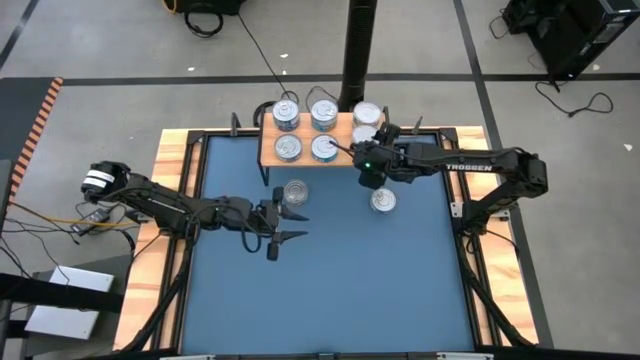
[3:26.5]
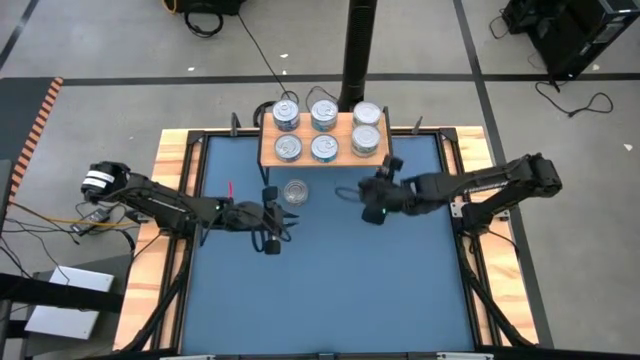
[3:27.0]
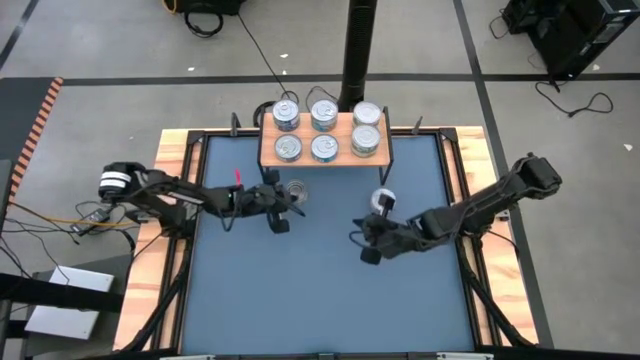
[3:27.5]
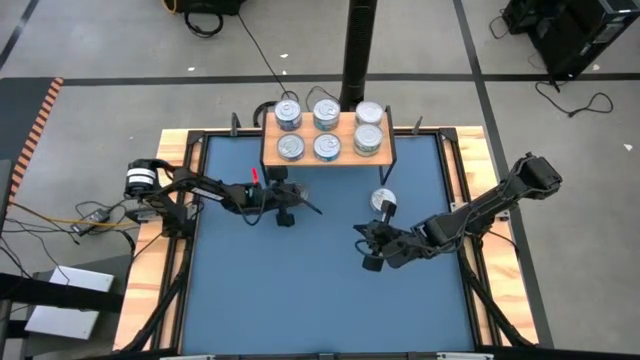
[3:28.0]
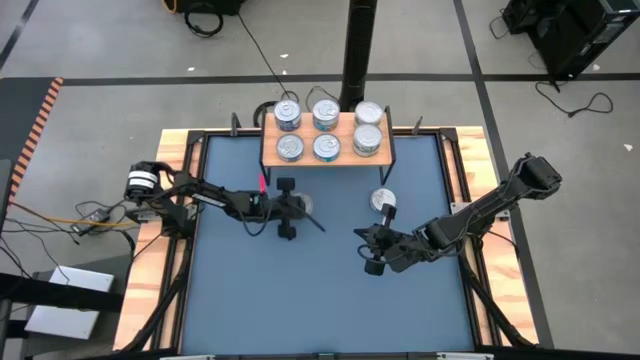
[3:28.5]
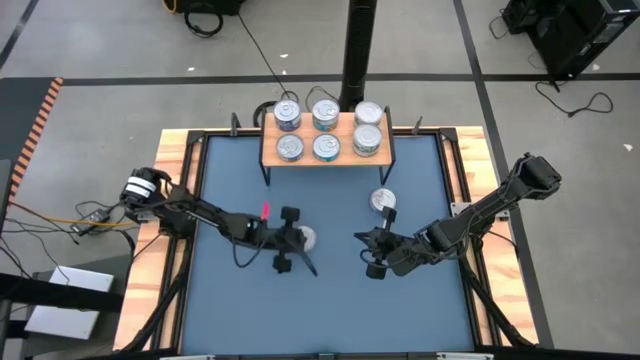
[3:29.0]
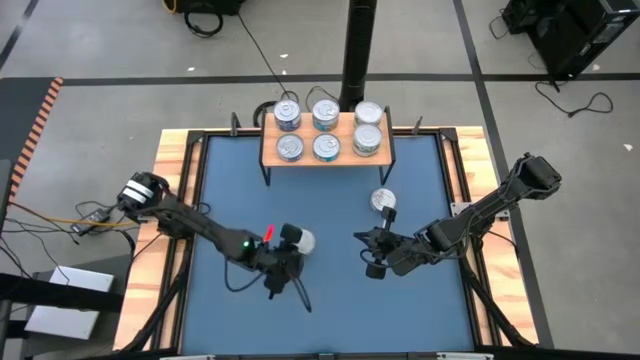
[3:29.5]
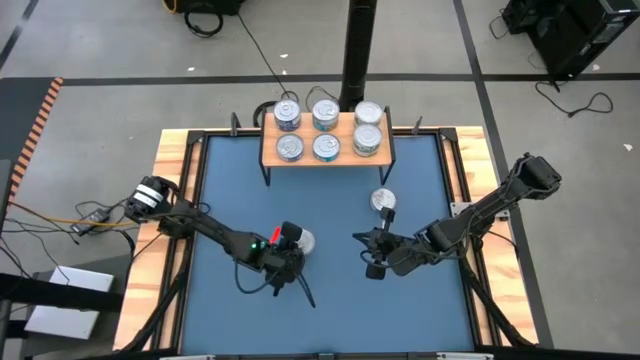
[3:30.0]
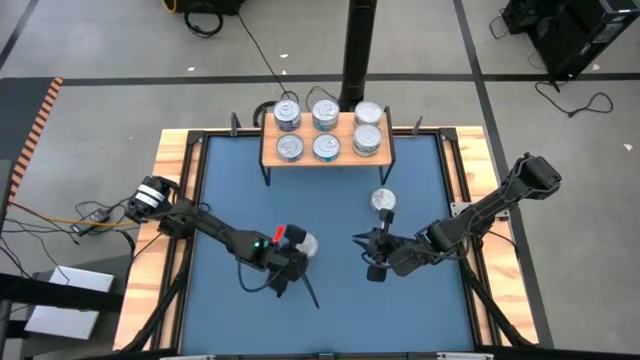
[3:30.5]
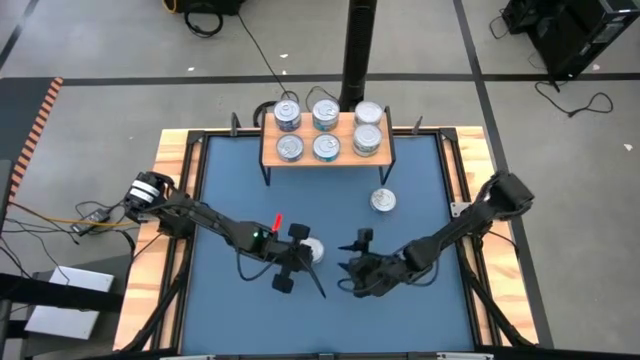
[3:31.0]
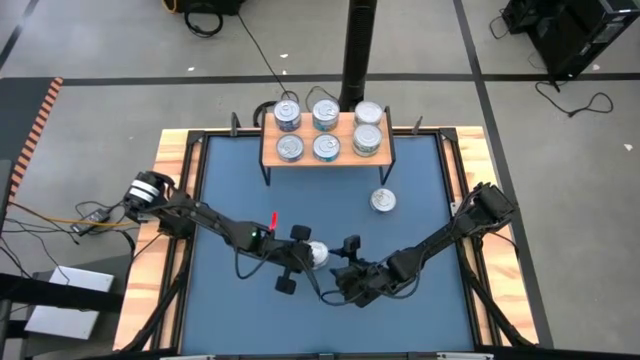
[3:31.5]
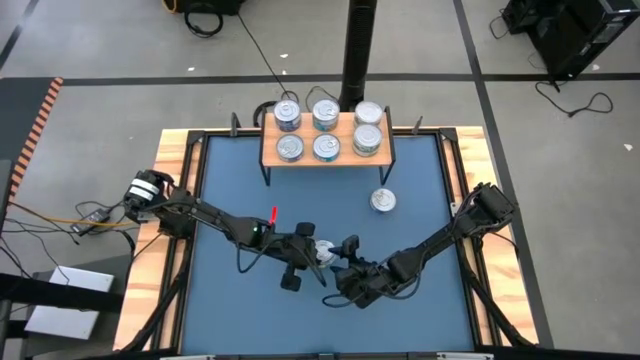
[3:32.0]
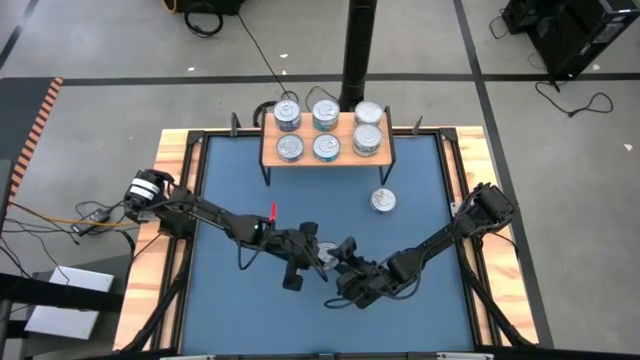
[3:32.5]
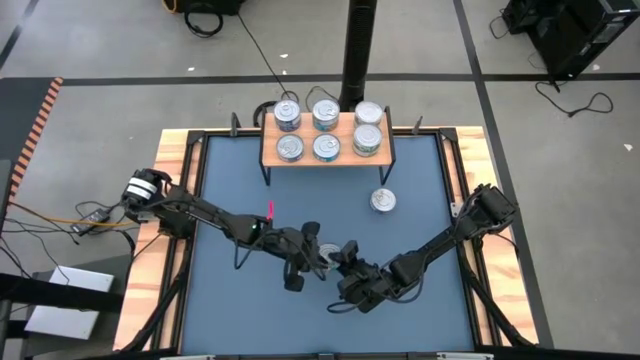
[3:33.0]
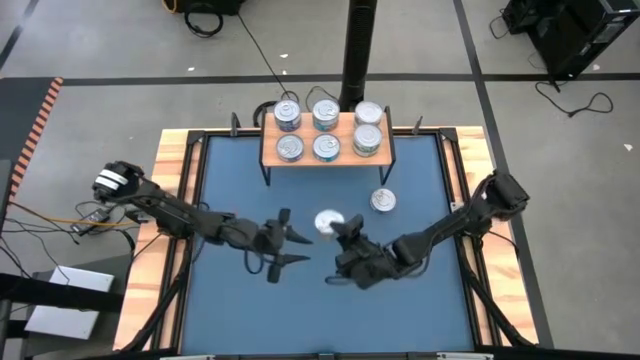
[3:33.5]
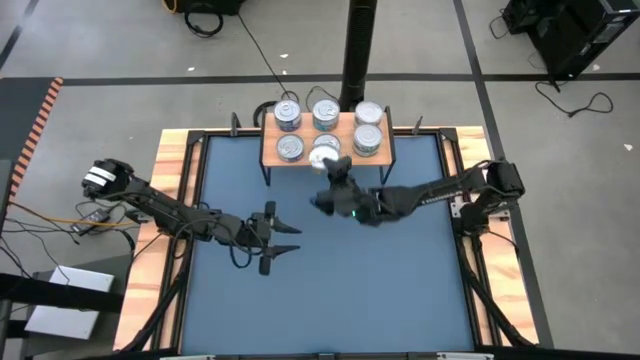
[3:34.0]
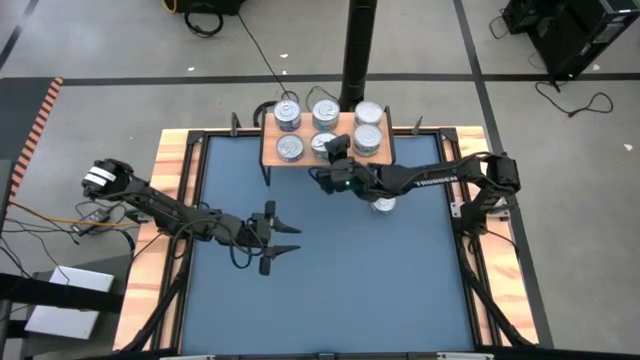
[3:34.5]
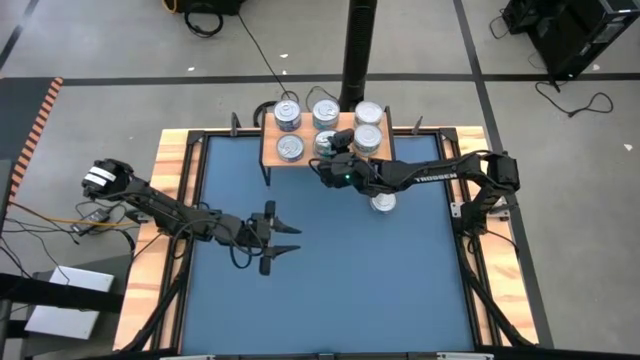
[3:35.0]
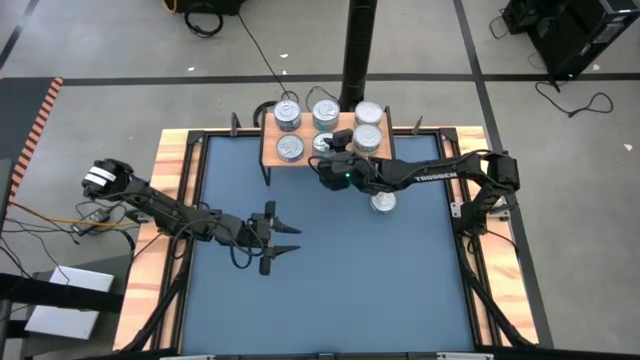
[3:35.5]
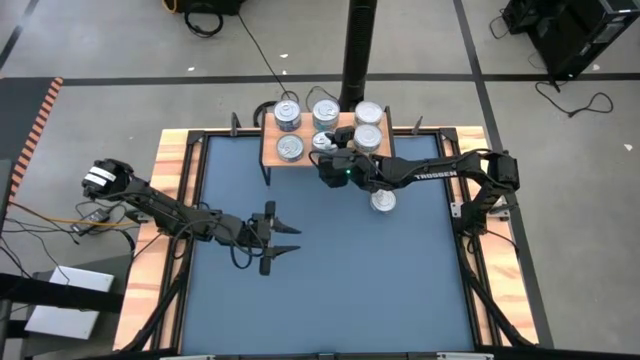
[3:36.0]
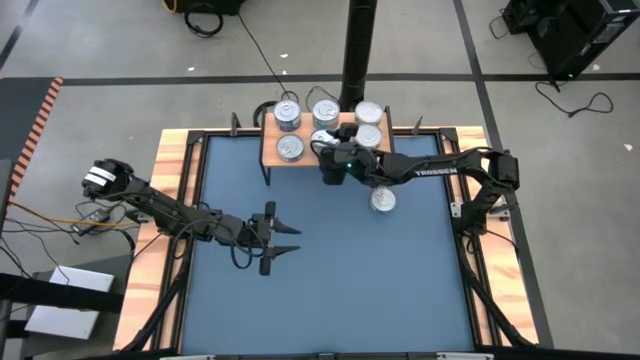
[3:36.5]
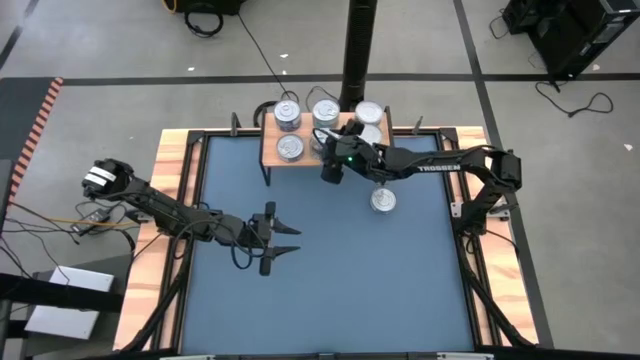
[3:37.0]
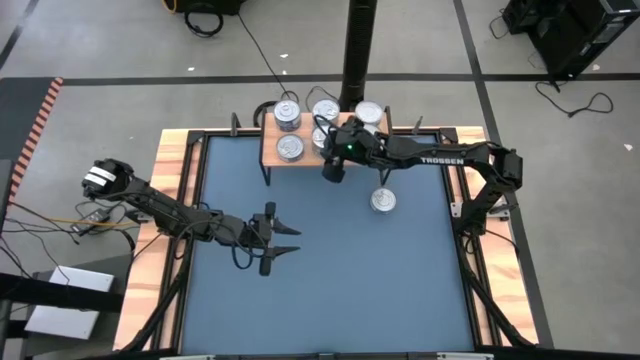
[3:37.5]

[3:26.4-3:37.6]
Task: Stack canned seafood by type on shelf
Stack the light blue tuna can on top of the light blue tuna can on the shelf

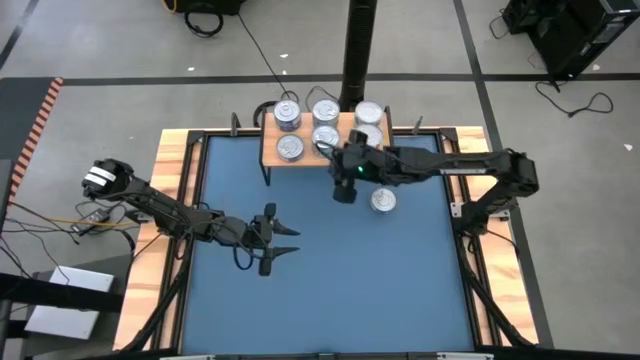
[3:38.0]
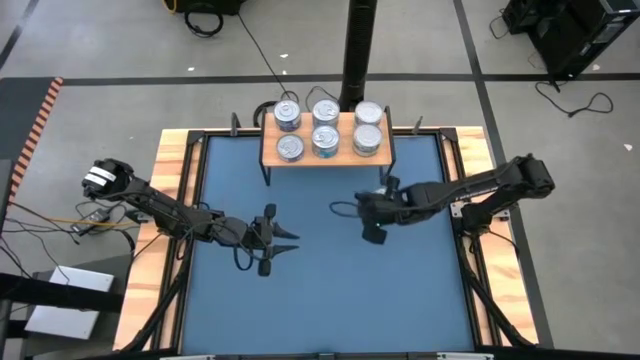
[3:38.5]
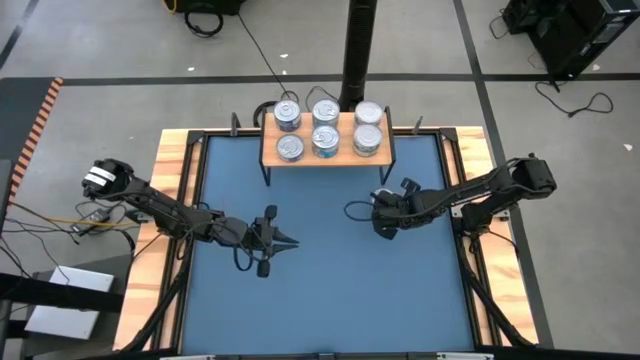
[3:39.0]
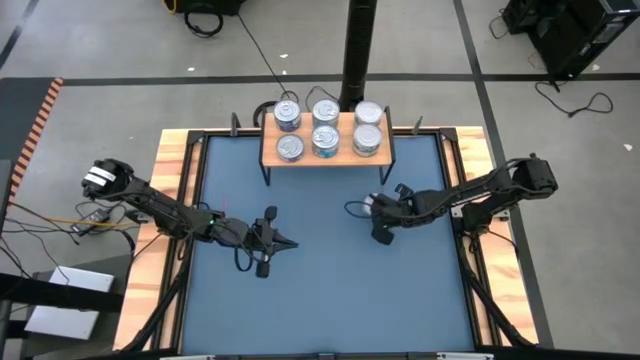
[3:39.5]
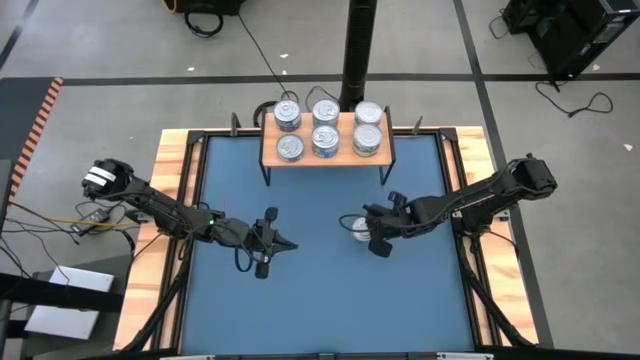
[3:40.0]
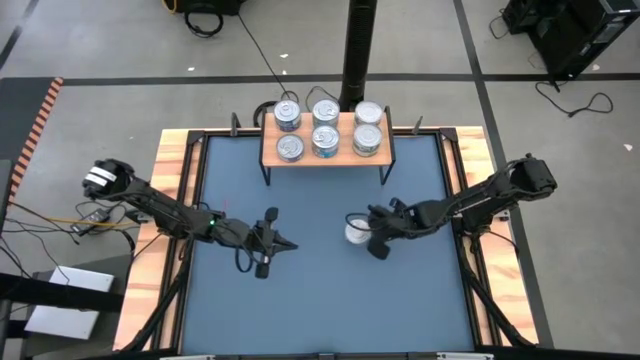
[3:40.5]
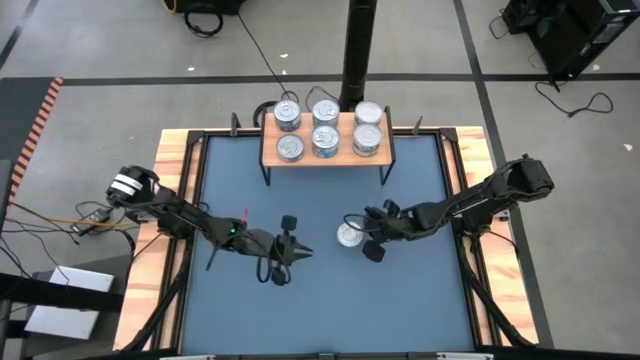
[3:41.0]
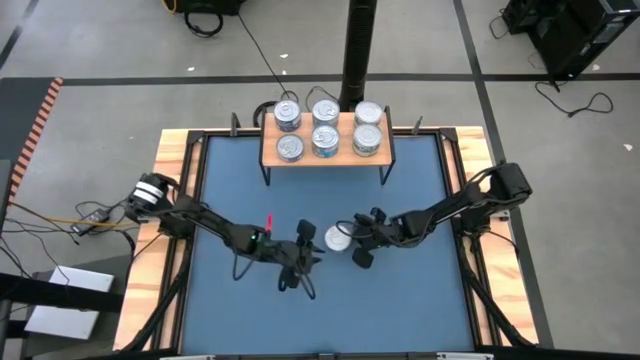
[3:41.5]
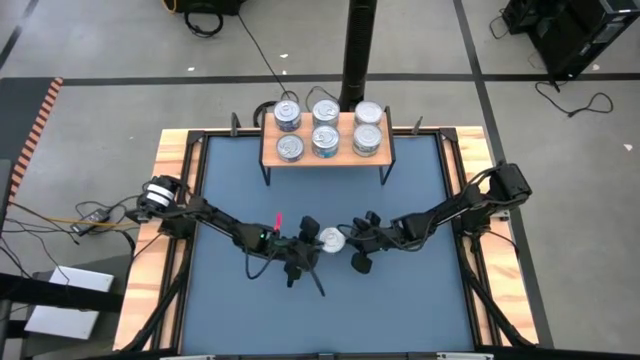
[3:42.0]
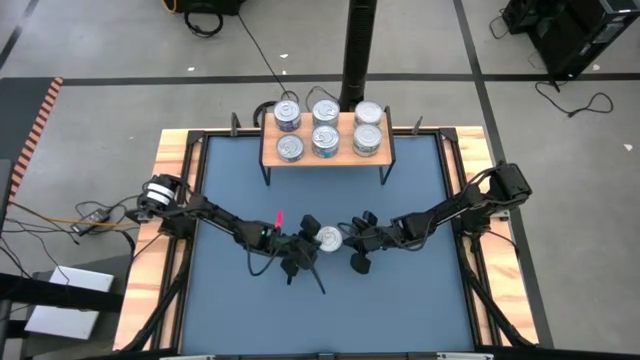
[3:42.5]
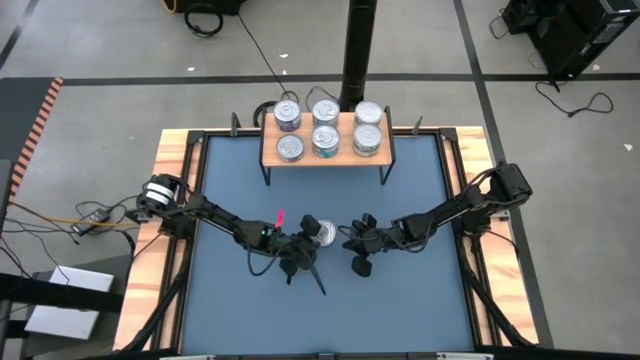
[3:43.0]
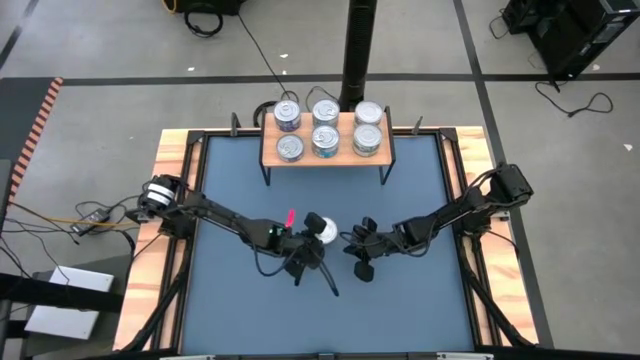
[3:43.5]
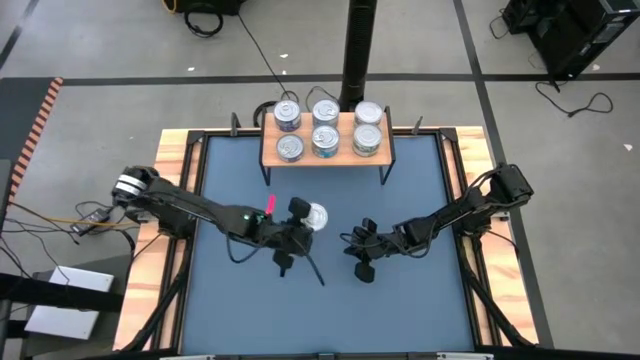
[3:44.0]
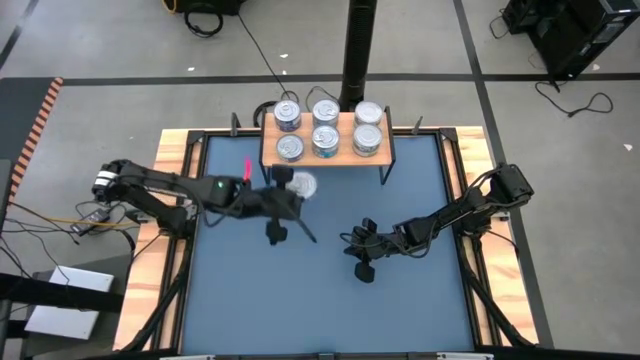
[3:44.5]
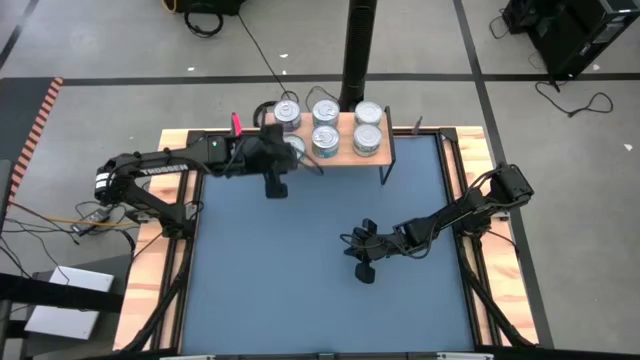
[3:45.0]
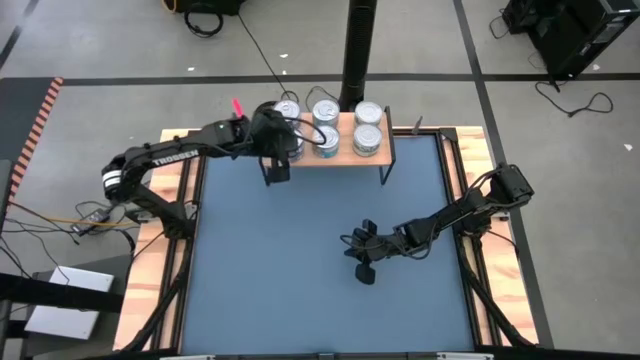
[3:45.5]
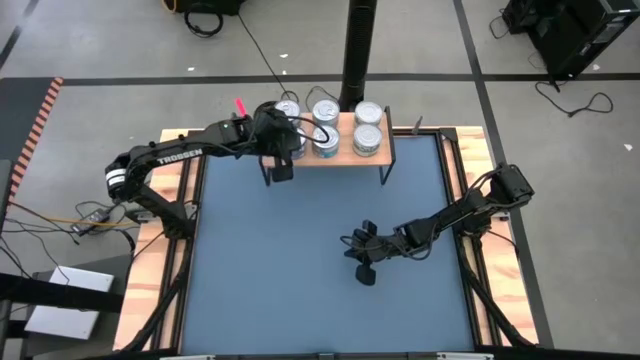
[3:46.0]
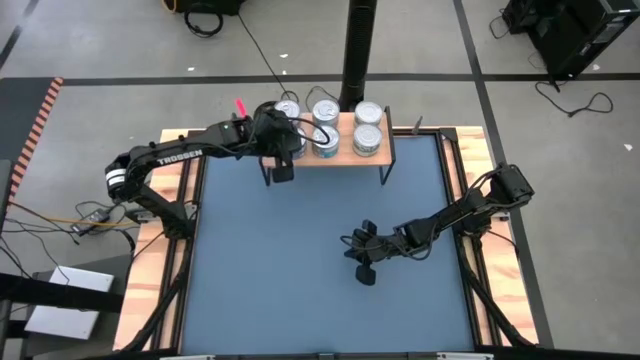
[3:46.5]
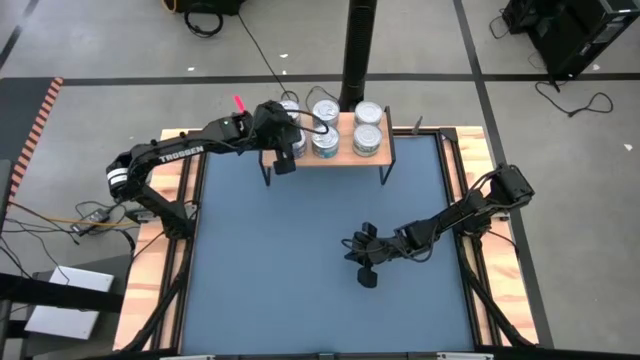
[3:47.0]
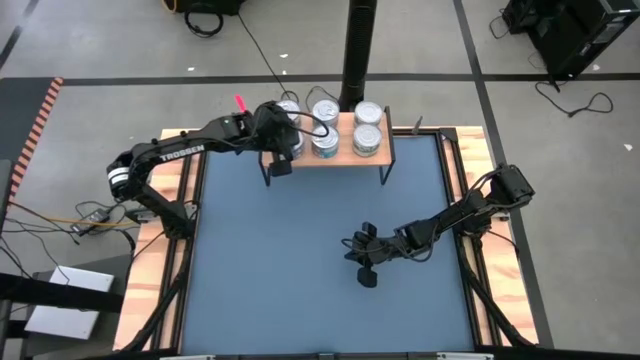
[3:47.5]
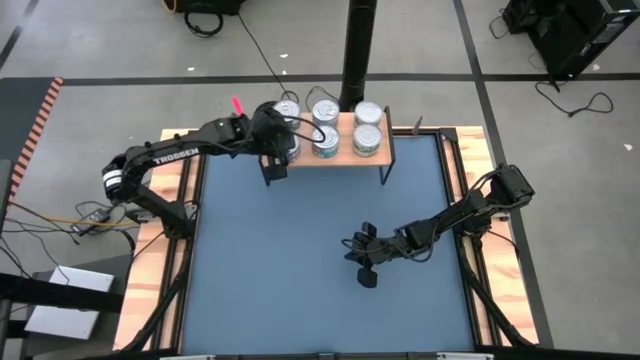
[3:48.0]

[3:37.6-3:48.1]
Stack the blue tuna can on top of the blue tuna can on the shelf
